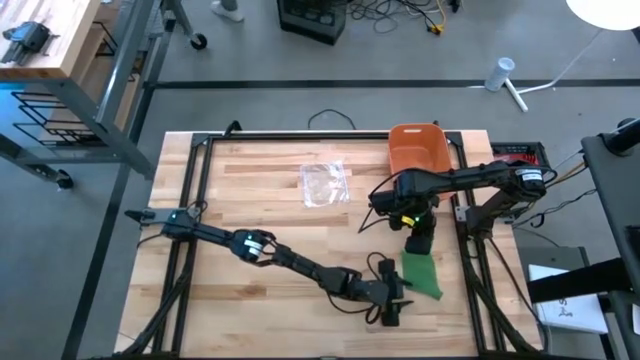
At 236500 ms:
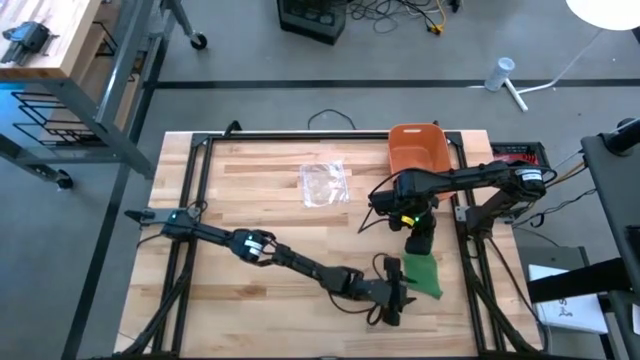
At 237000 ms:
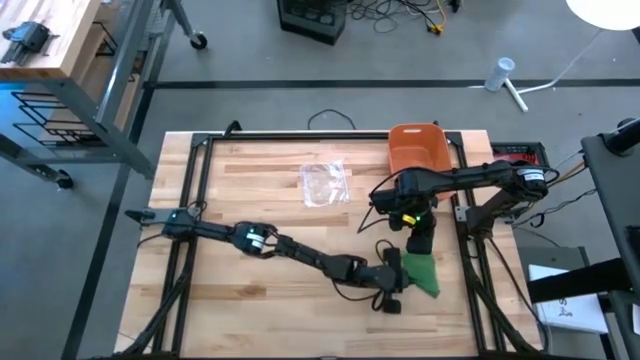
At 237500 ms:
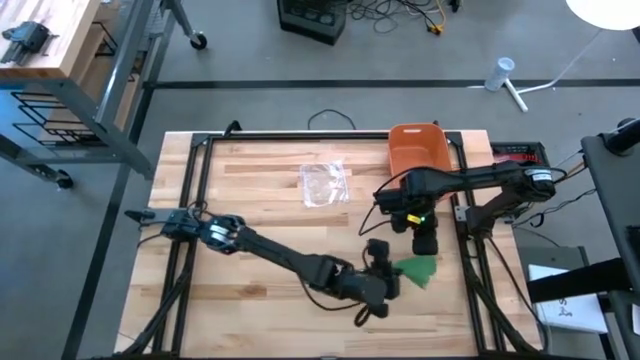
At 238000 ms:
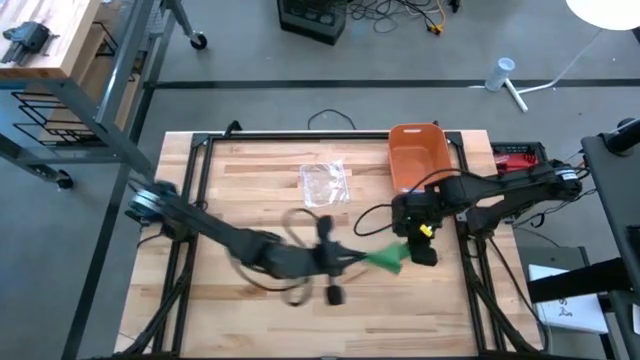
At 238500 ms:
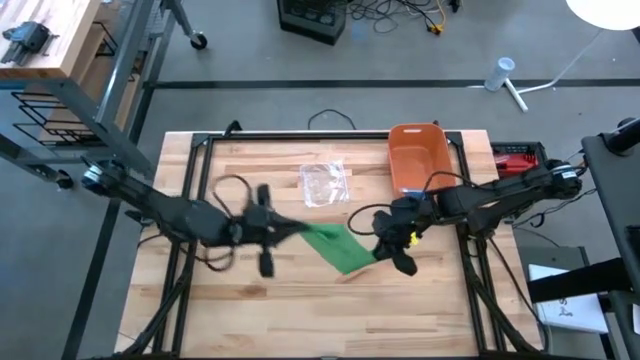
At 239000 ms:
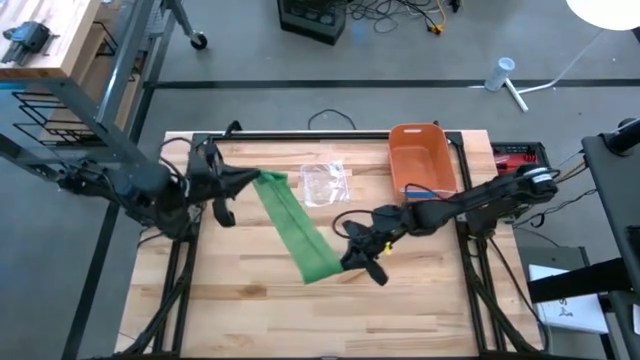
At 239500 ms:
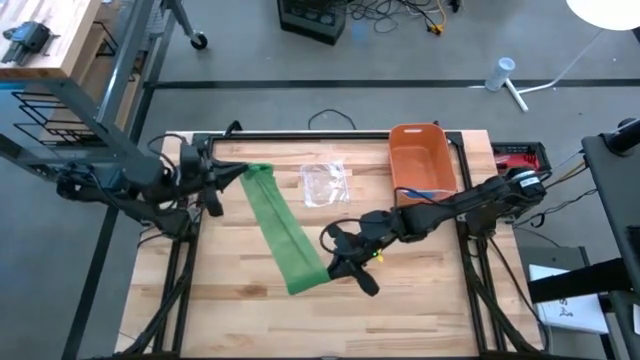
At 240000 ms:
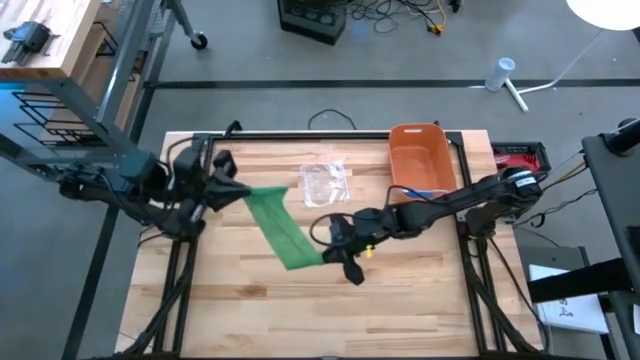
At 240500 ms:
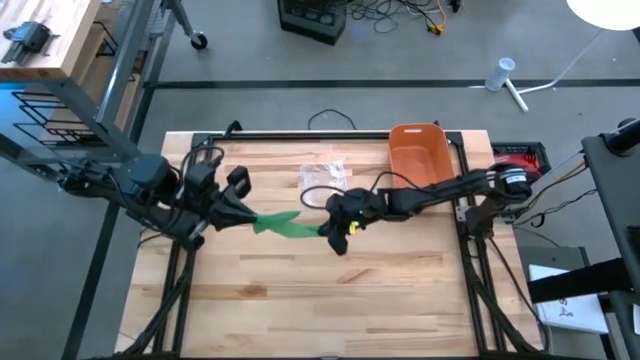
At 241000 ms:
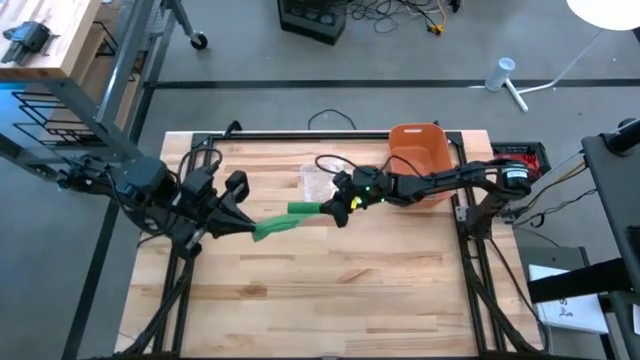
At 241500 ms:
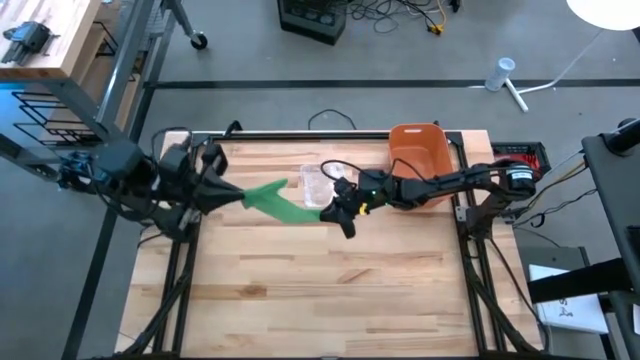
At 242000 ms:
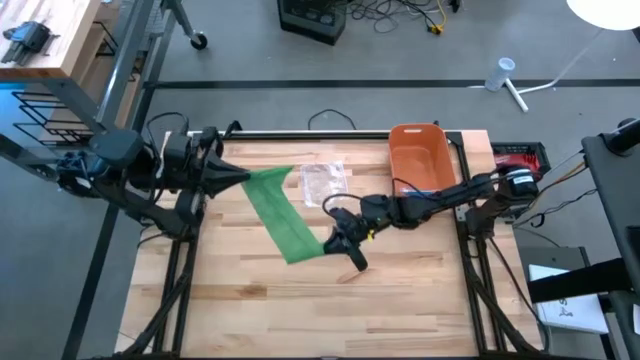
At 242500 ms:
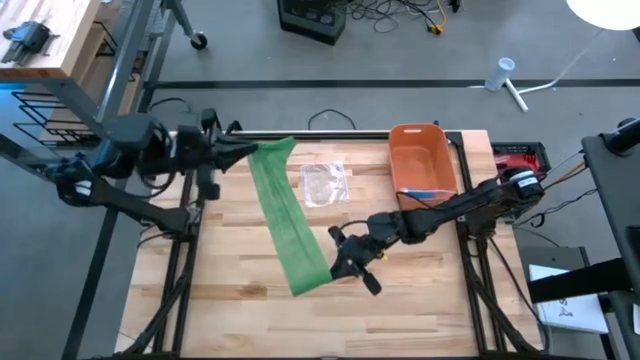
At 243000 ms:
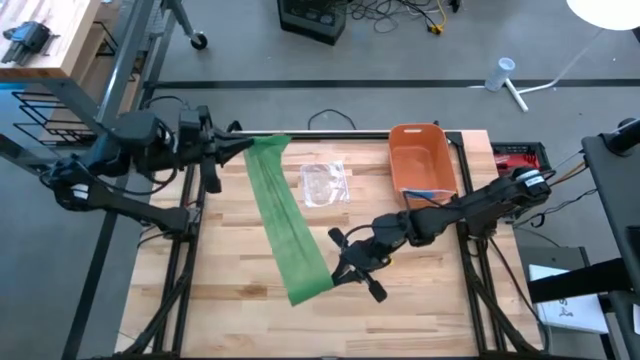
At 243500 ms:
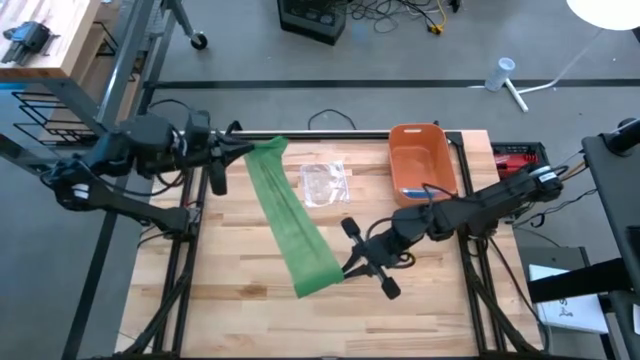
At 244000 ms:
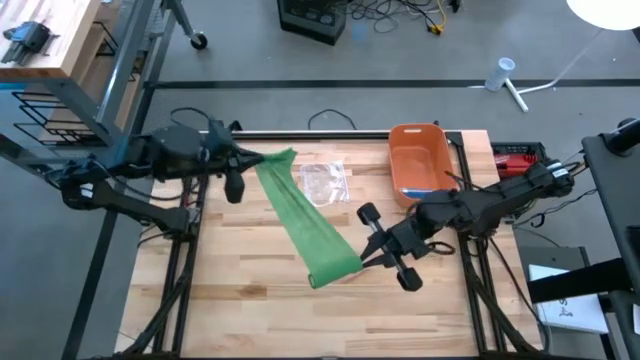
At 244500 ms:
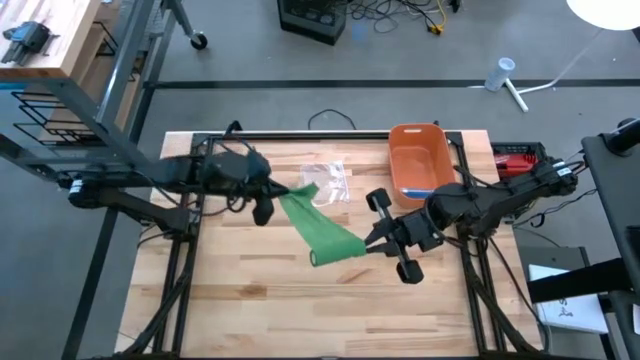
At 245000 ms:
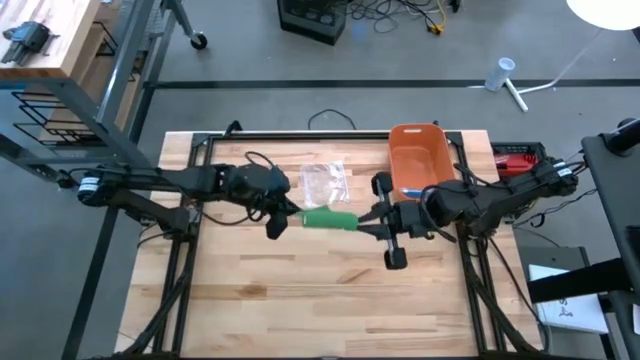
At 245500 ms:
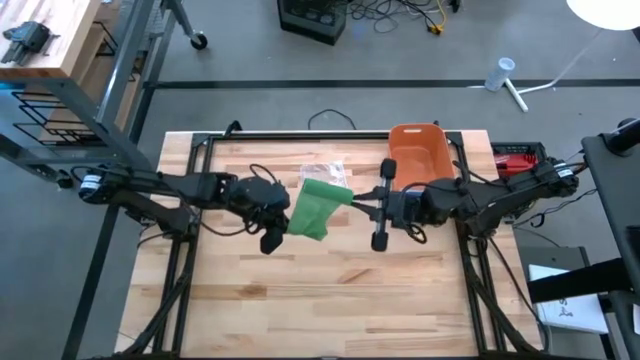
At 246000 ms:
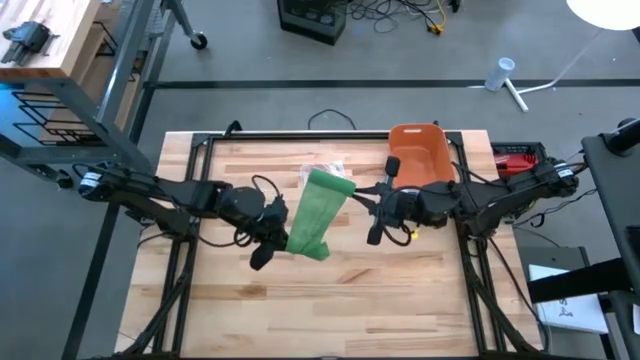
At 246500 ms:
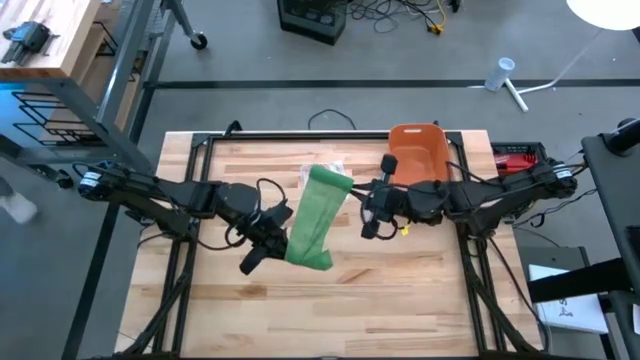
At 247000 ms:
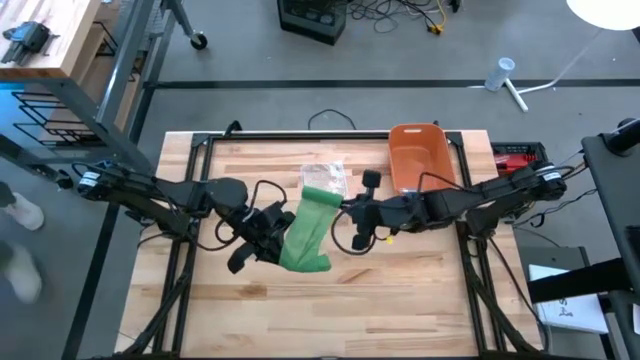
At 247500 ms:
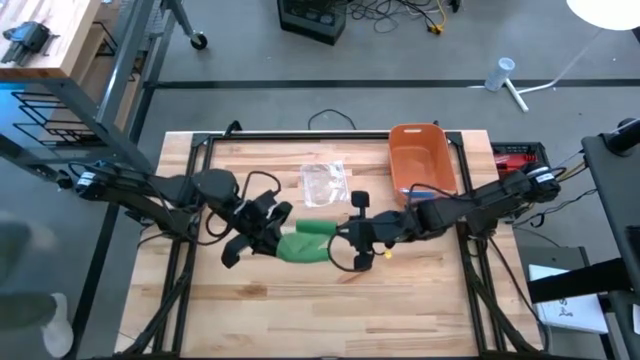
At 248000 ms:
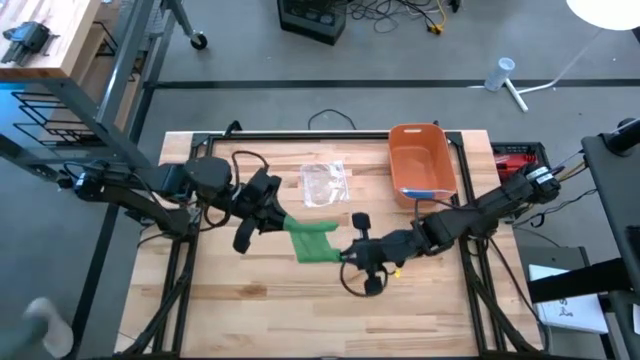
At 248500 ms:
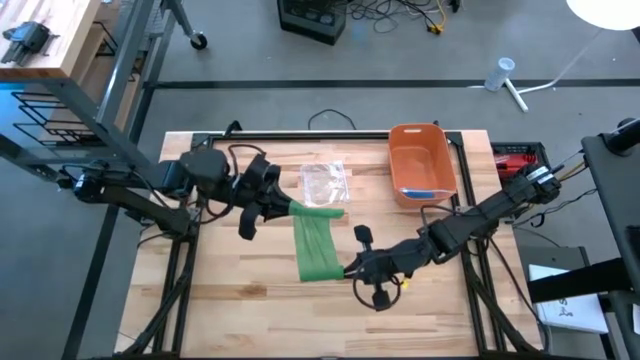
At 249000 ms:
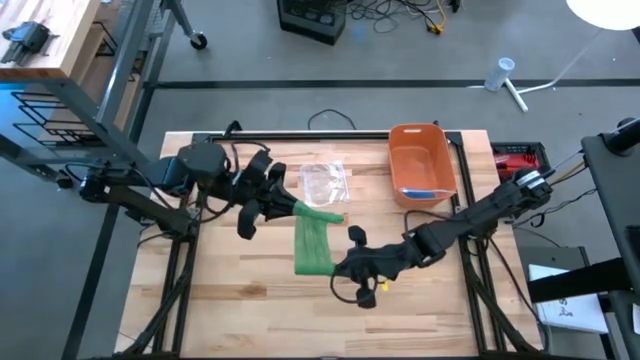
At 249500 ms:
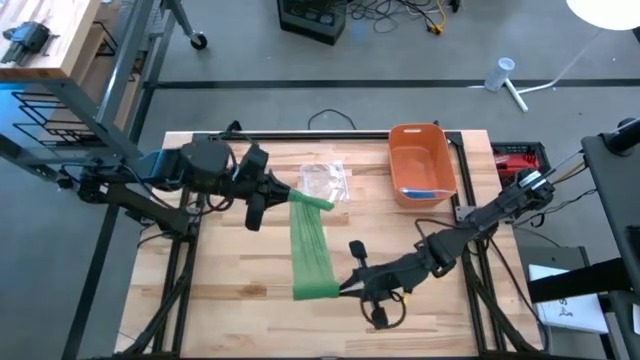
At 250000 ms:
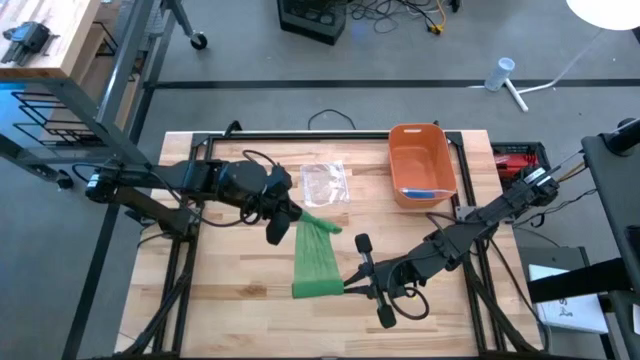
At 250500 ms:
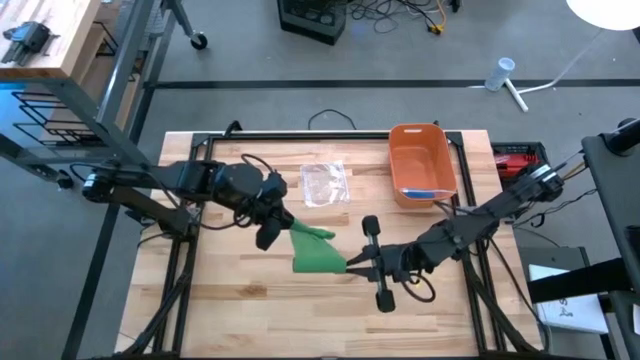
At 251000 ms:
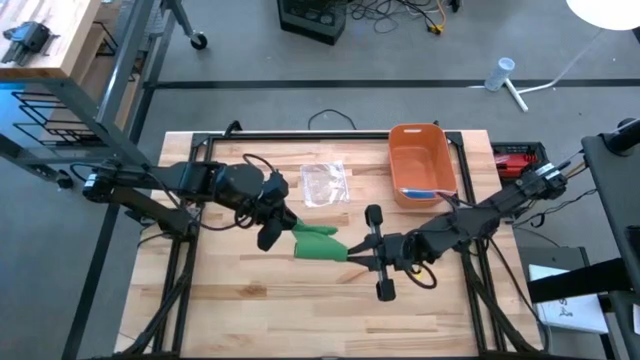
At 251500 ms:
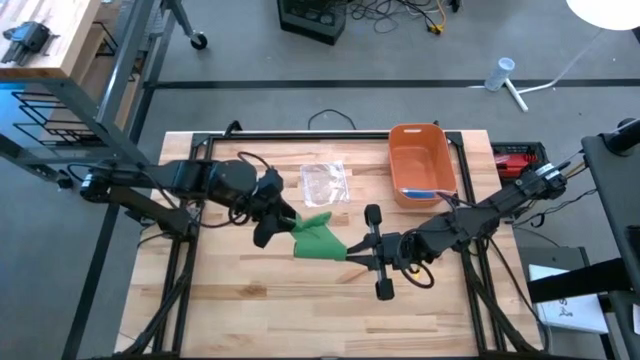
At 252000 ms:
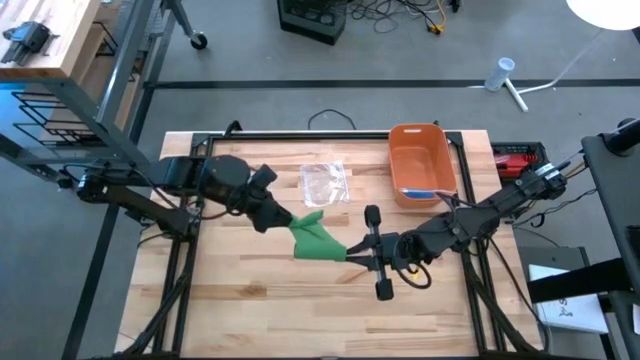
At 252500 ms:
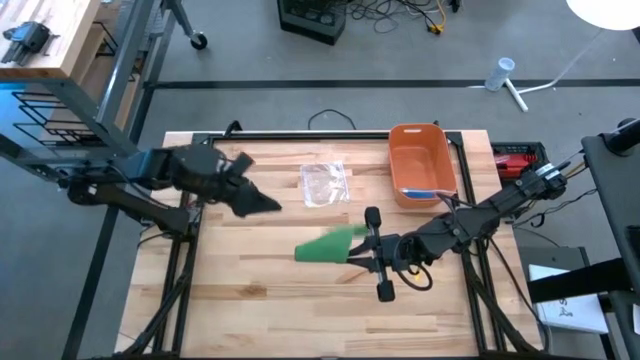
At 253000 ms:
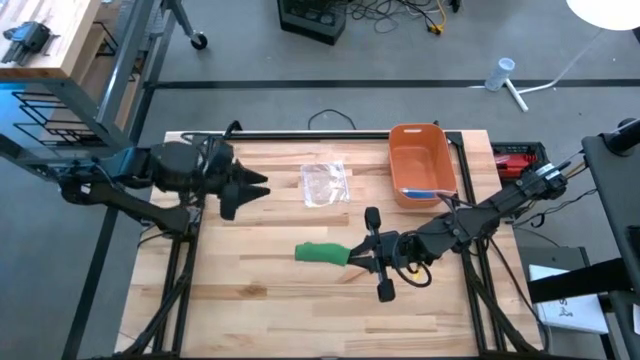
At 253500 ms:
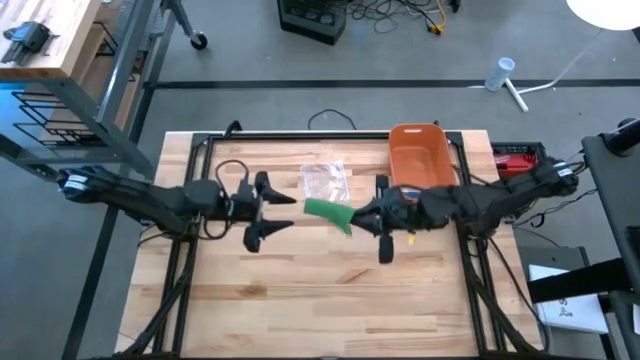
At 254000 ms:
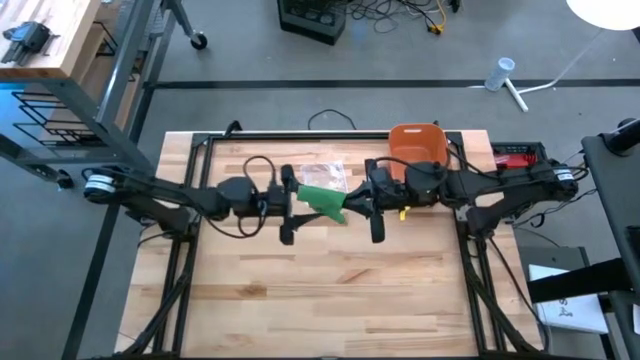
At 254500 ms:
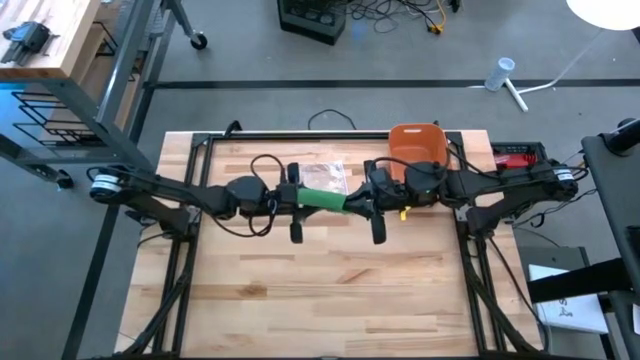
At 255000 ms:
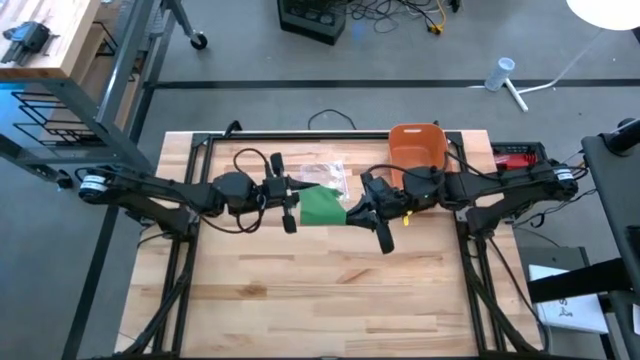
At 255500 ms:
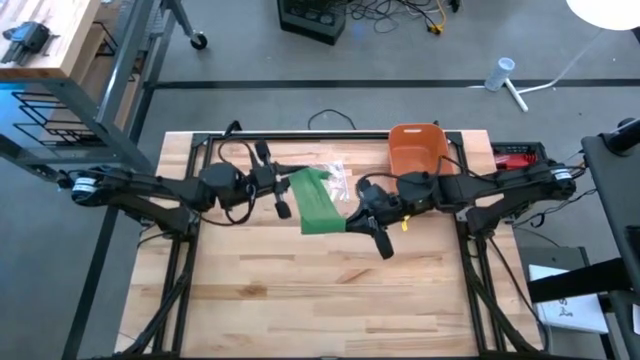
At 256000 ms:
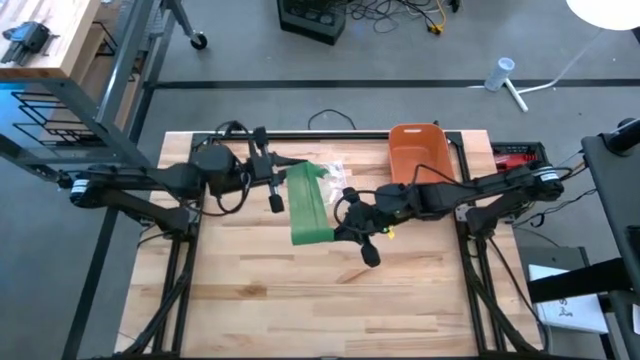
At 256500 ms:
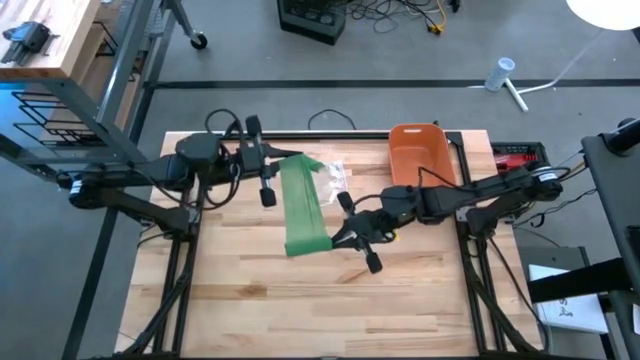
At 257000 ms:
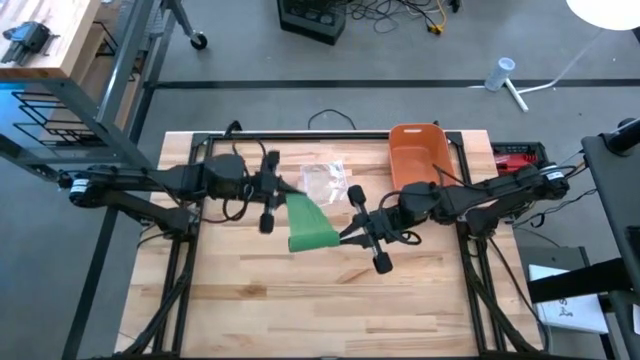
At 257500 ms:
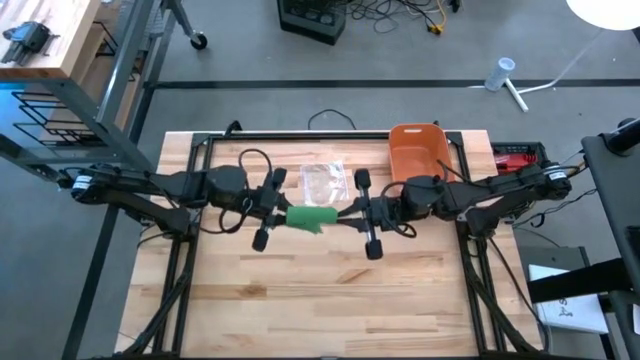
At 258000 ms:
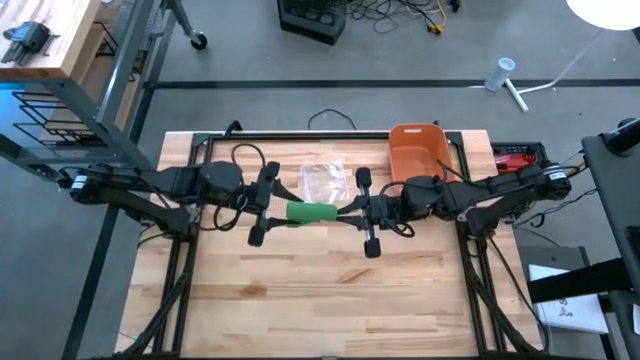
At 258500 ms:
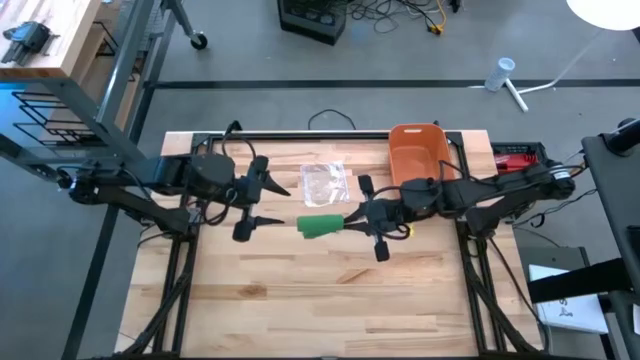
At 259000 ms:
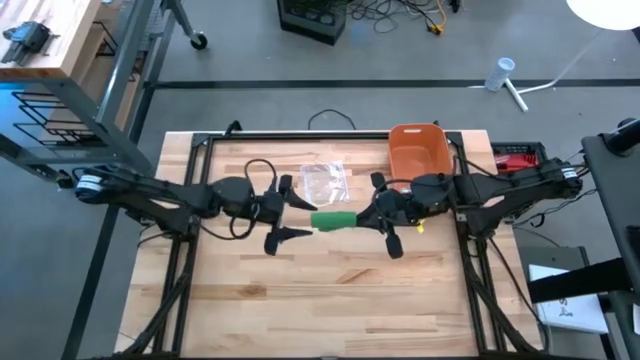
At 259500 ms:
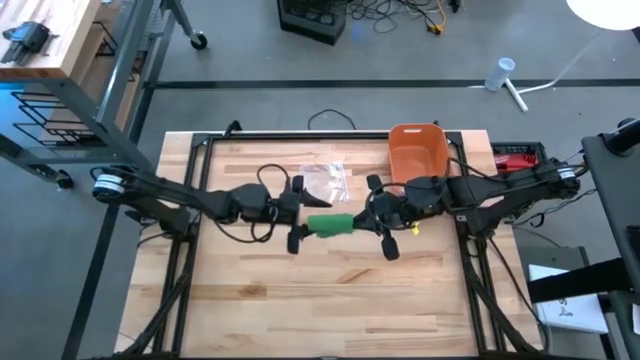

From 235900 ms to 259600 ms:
Task: Roll bandage
Roll the green bandage
